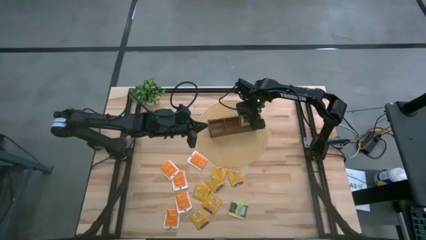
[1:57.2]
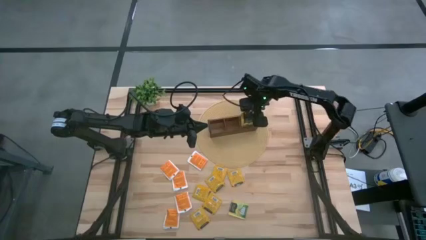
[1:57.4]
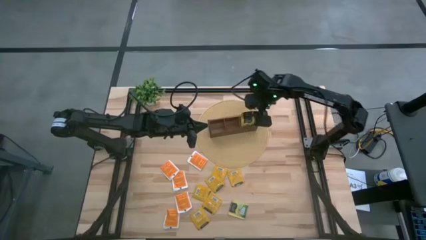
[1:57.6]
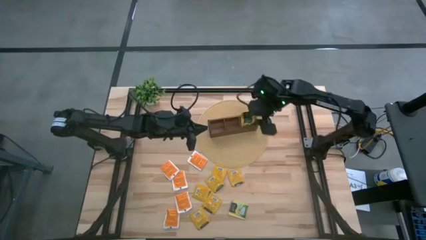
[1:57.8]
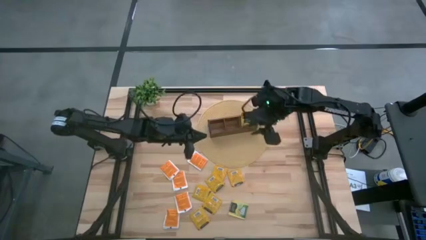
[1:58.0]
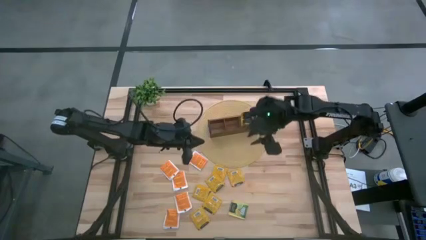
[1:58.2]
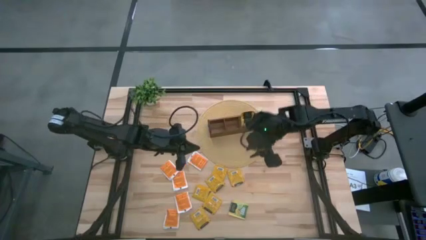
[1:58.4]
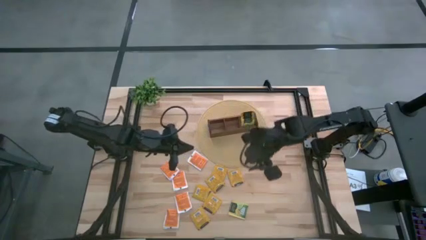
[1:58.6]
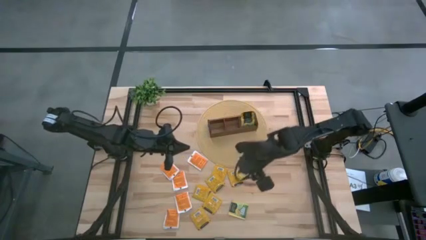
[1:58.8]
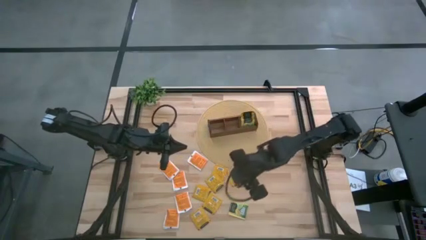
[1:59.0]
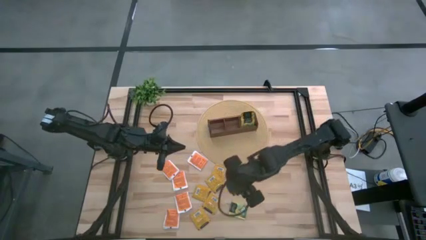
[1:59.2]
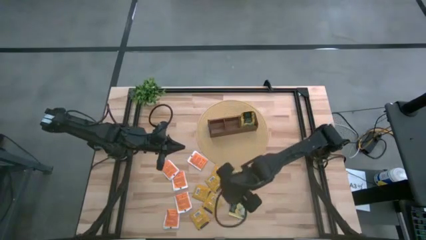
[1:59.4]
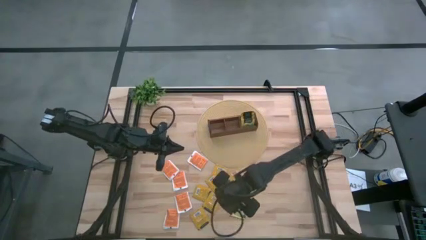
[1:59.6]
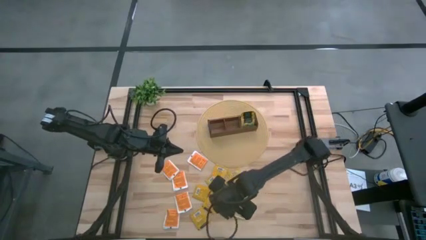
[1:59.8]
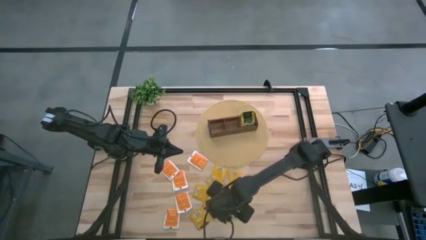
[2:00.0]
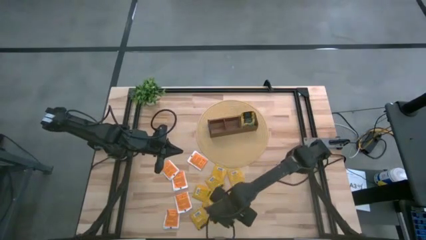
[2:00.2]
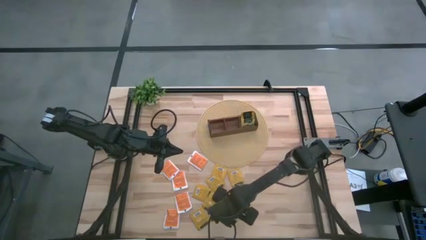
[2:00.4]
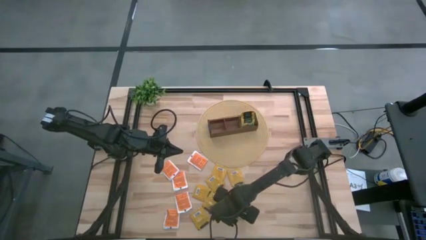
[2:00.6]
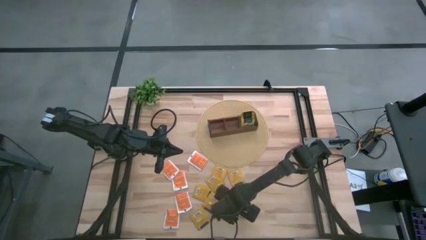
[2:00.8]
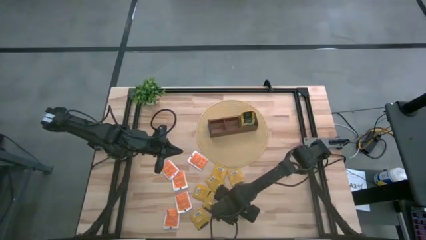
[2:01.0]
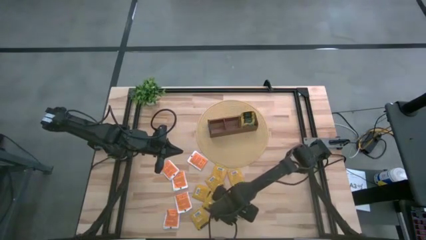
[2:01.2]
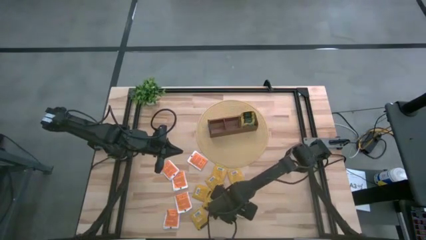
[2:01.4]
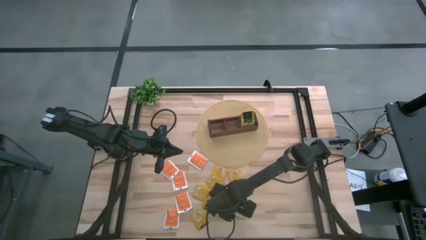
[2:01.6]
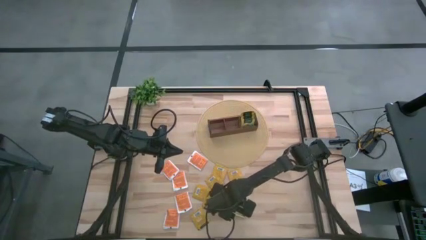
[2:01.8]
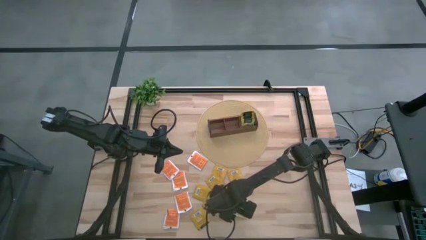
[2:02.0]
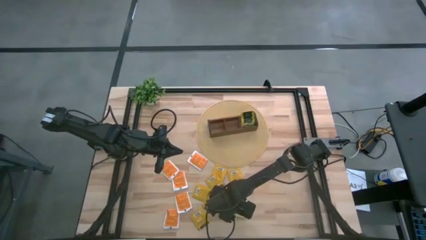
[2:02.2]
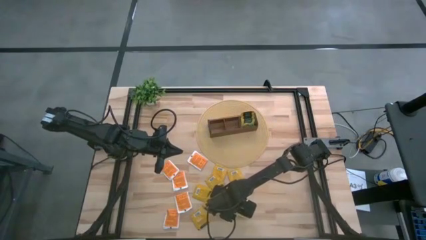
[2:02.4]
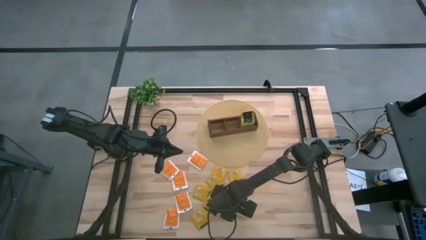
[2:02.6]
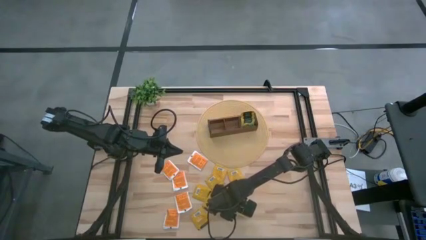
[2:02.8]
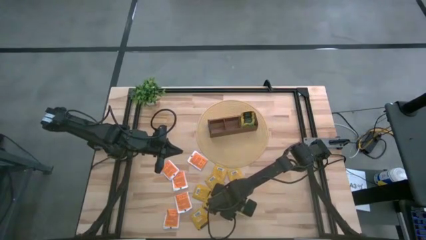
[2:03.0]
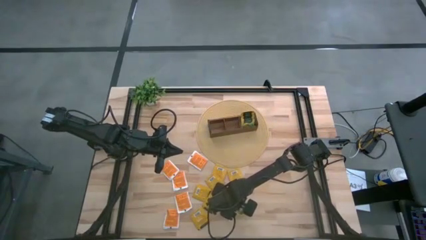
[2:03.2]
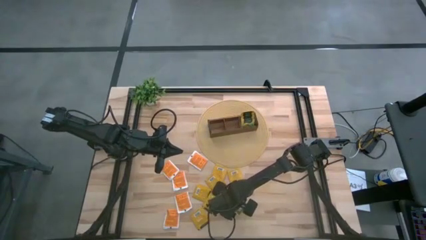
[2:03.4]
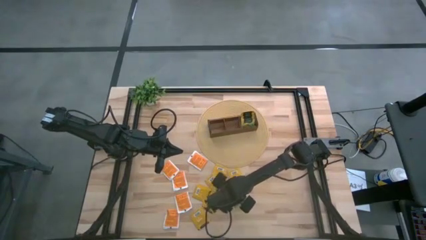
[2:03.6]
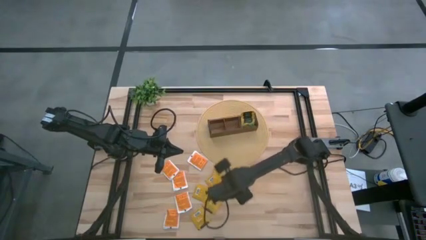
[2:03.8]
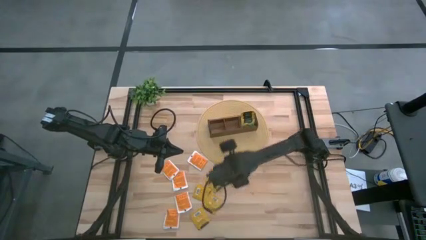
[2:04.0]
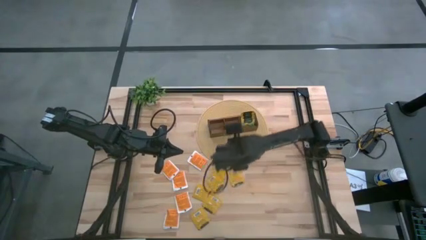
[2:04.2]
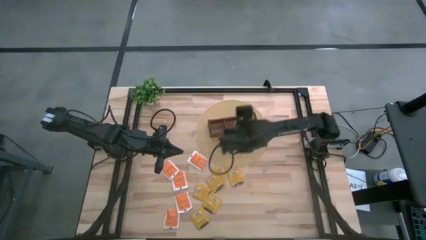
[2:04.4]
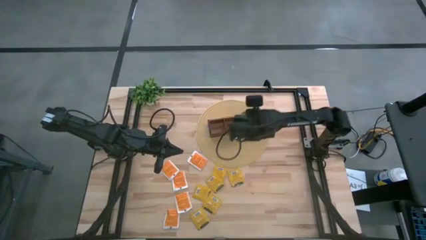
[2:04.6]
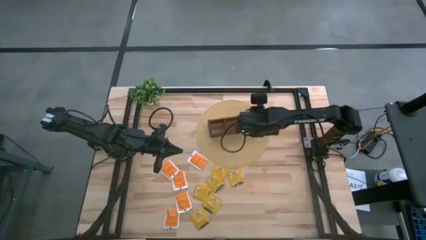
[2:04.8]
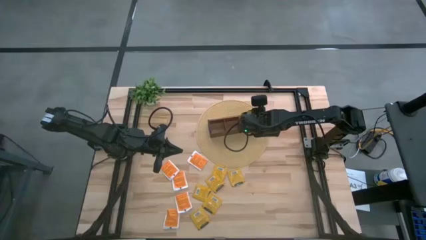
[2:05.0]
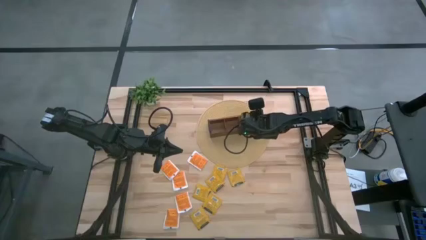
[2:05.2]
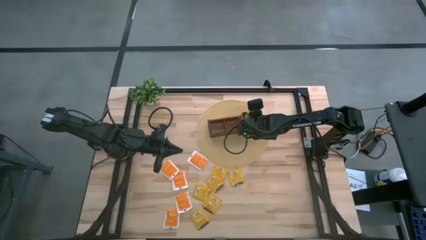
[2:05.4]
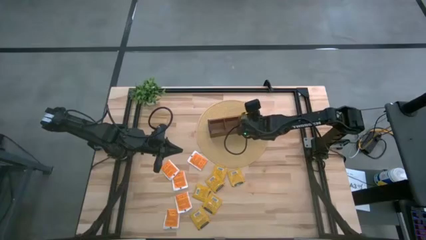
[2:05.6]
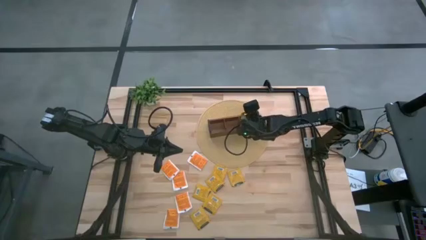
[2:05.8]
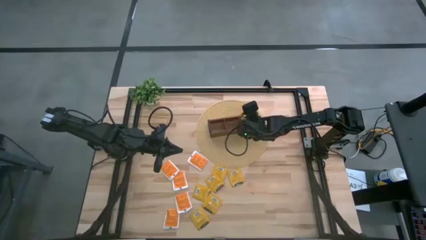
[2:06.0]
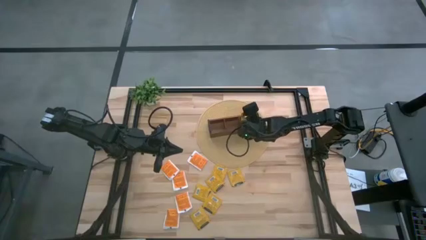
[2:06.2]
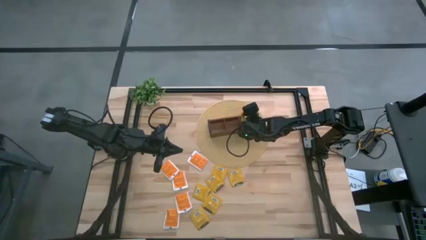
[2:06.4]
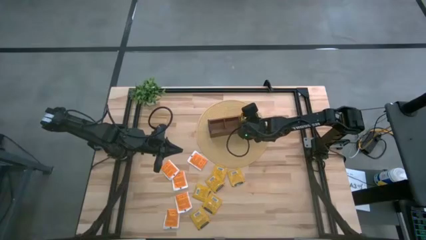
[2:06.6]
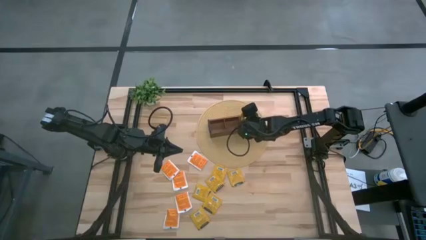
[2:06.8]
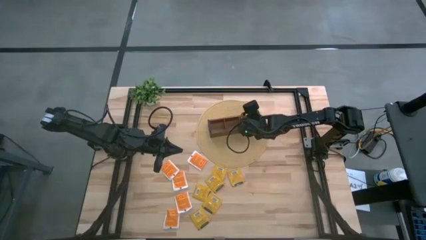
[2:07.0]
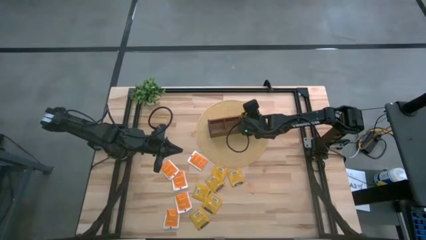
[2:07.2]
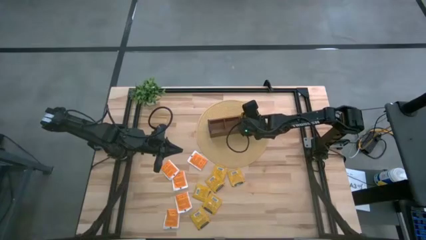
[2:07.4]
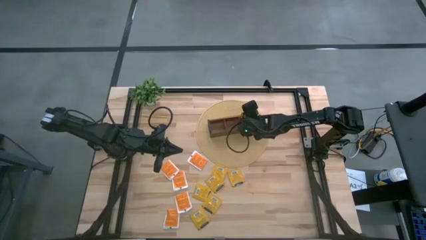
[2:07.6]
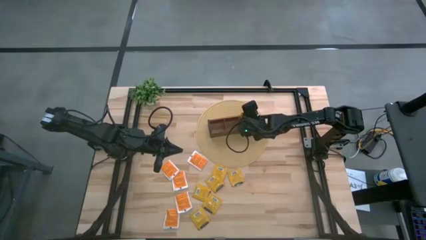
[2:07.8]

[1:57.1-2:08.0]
Task: Pick & Place Tea
Put the yellow tea bag into the right section of the wooden organizer

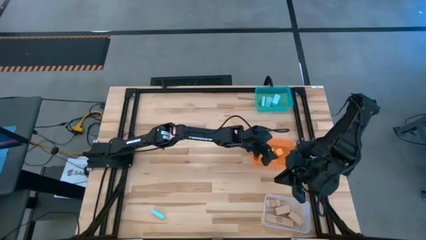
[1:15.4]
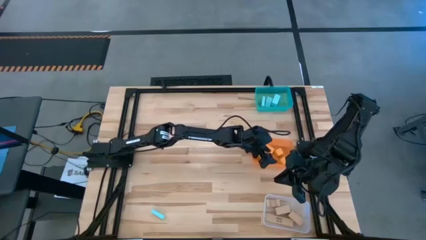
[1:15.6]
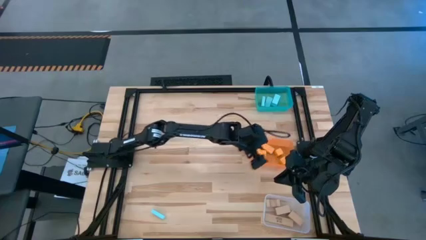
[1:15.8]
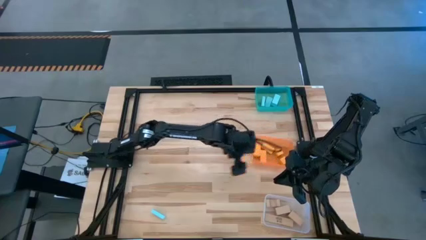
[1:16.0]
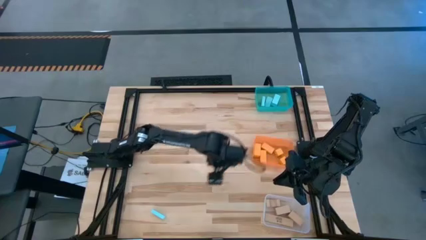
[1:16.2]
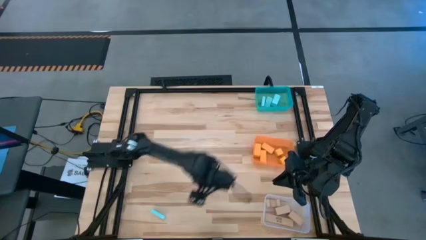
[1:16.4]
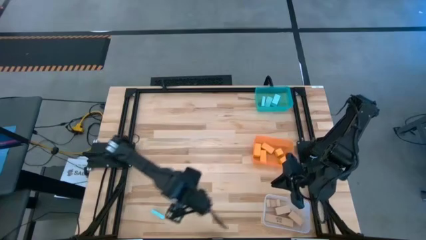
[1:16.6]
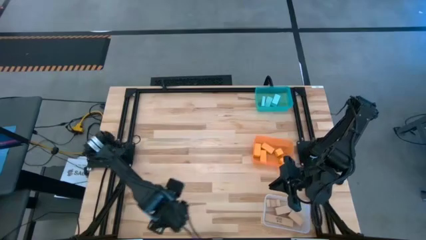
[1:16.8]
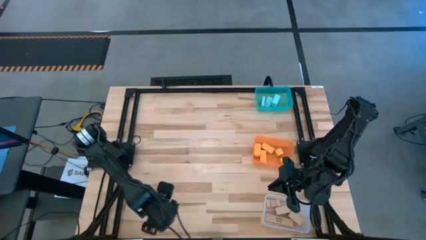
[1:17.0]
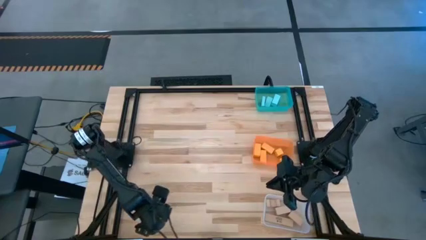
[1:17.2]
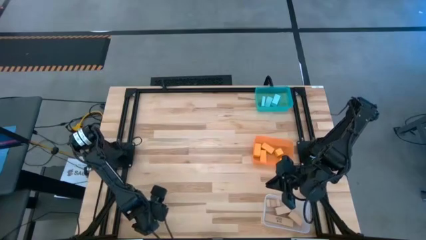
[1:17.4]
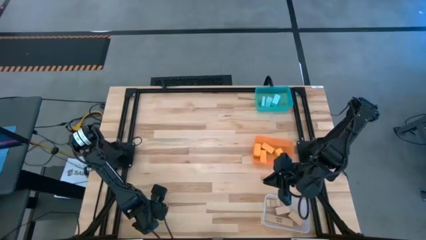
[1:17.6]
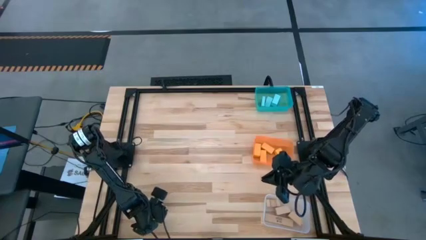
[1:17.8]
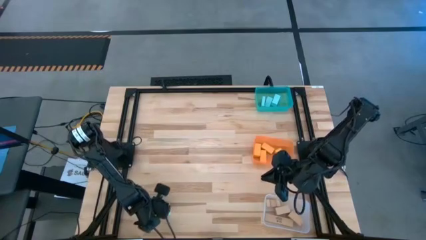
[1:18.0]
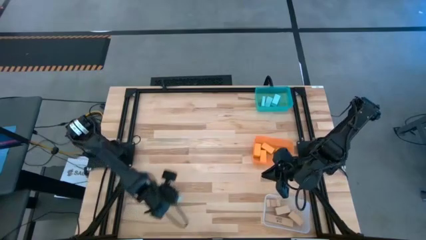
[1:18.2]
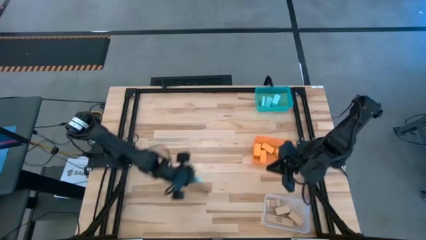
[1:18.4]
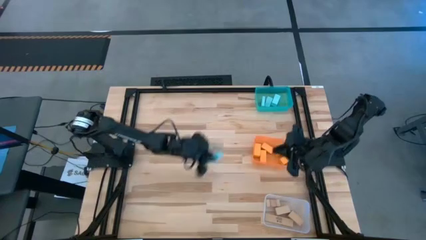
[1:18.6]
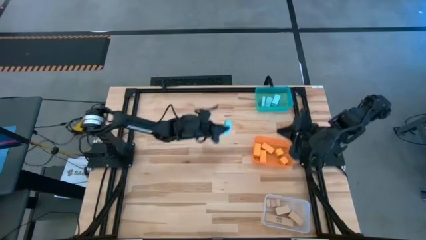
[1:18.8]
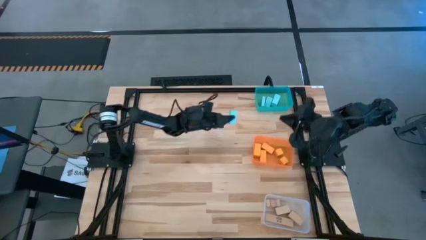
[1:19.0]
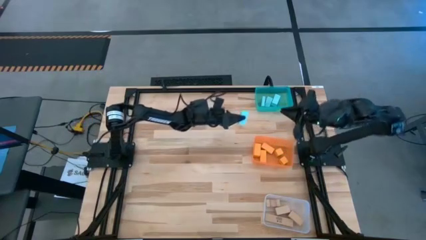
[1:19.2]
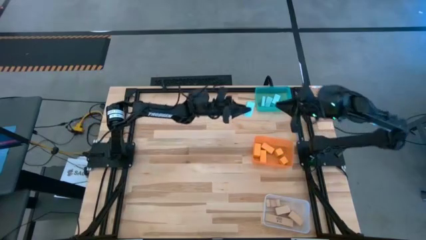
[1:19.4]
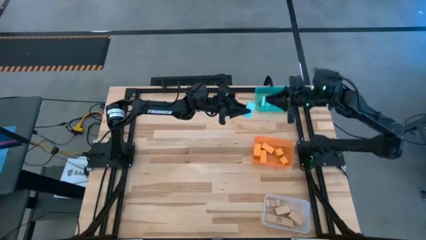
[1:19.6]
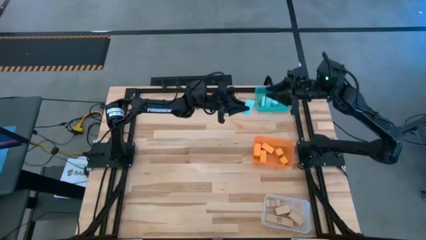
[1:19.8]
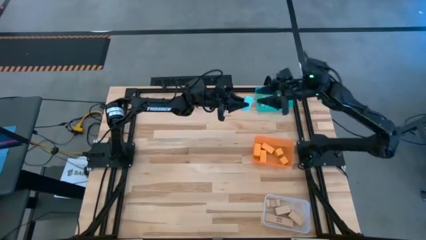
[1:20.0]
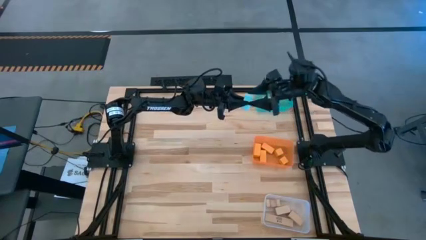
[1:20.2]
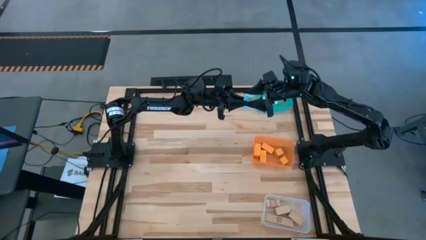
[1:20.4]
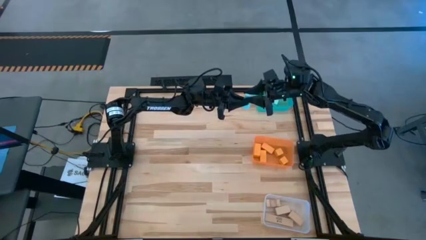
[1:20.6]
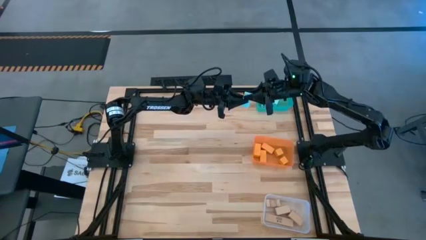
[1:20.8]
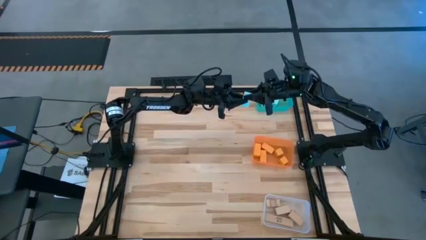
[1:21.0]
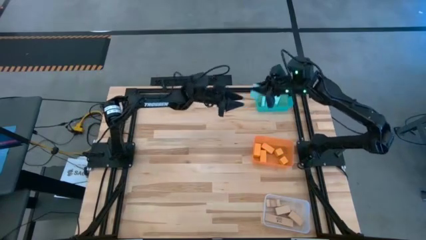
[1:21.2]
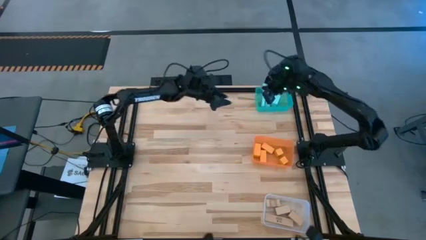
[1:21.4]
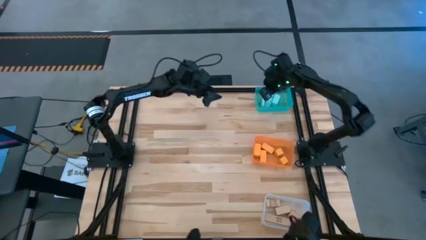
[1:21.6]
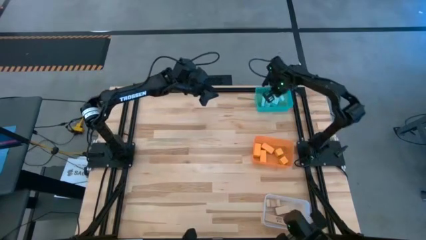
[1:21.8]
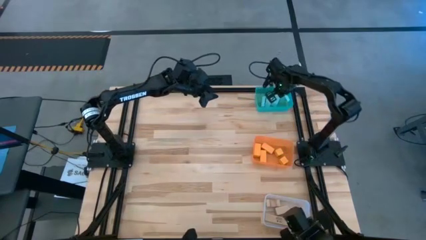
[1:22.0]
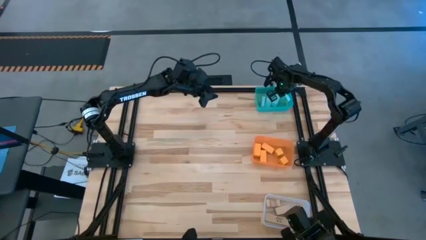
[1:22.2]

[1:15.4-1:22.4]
Task: Sort & place blocks by color
Put the blue block into the blue bin
